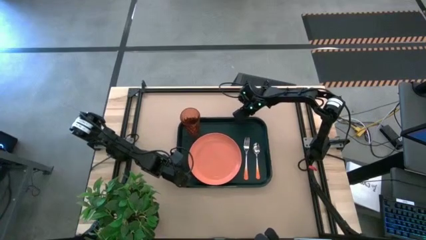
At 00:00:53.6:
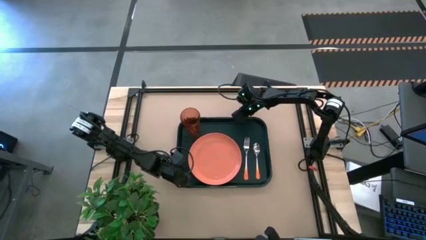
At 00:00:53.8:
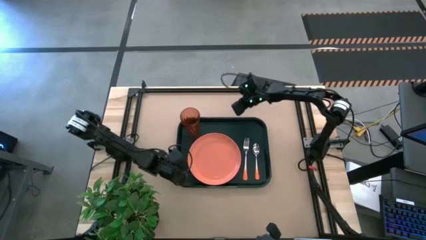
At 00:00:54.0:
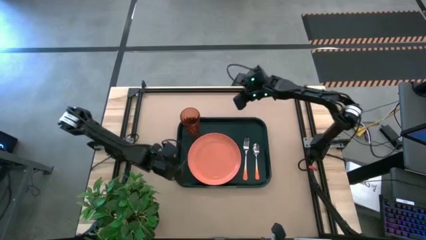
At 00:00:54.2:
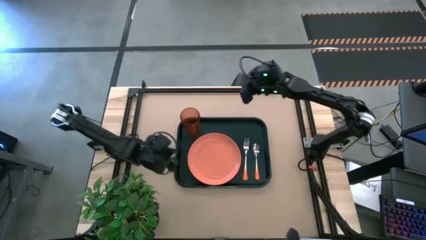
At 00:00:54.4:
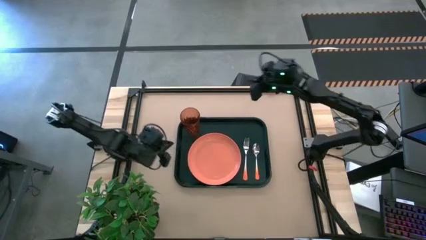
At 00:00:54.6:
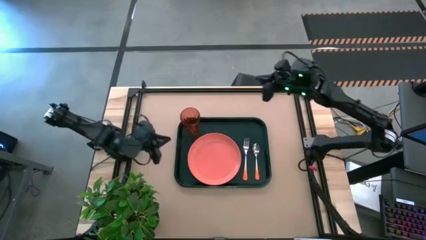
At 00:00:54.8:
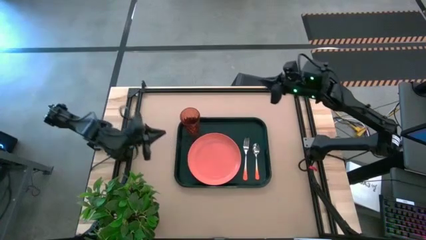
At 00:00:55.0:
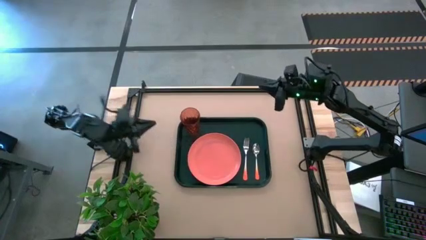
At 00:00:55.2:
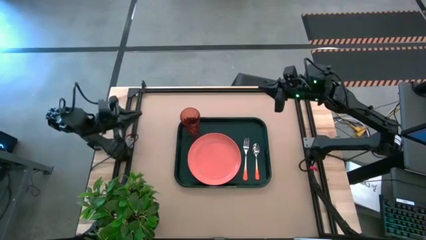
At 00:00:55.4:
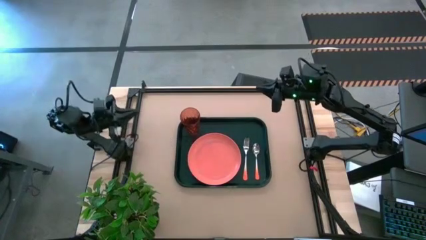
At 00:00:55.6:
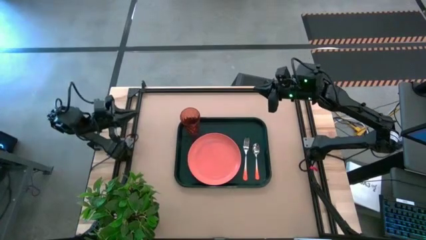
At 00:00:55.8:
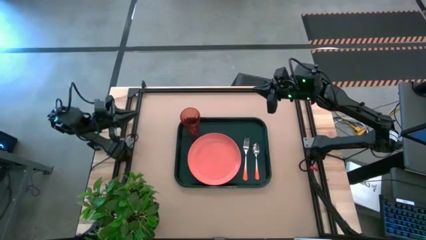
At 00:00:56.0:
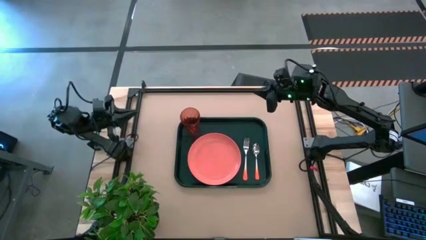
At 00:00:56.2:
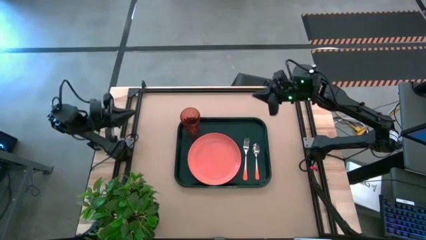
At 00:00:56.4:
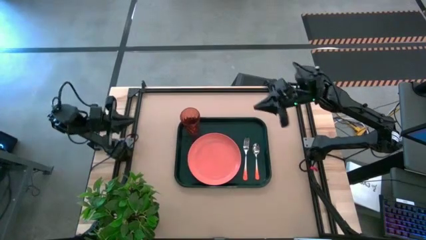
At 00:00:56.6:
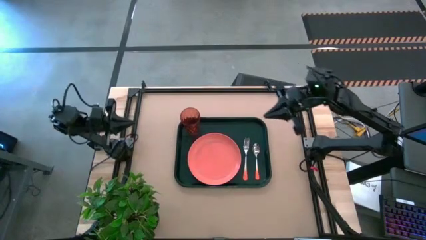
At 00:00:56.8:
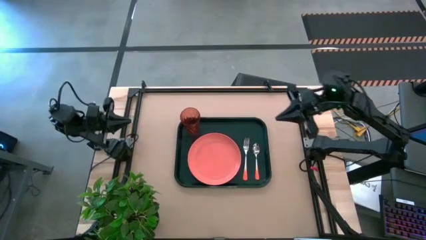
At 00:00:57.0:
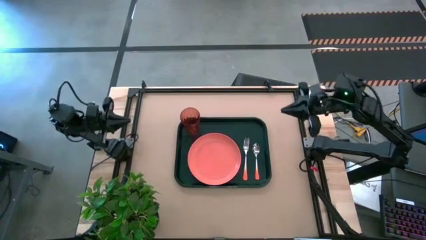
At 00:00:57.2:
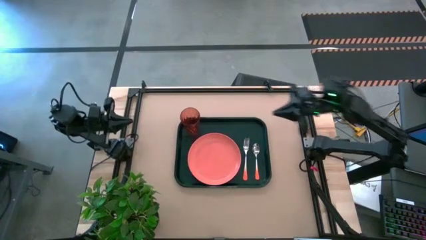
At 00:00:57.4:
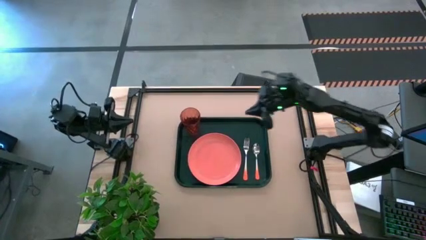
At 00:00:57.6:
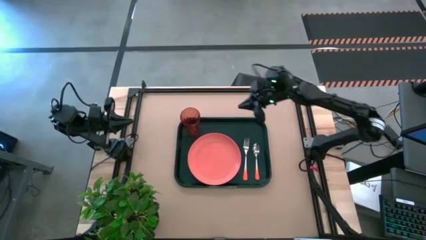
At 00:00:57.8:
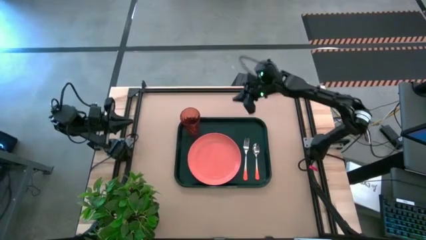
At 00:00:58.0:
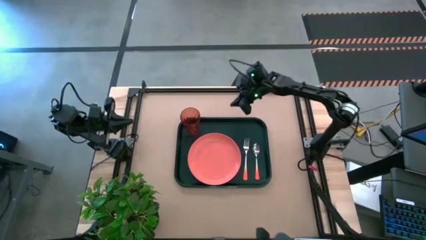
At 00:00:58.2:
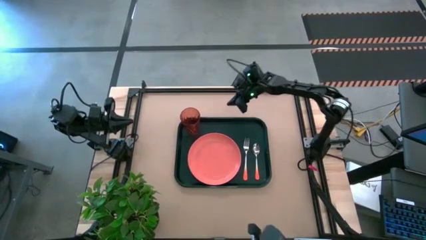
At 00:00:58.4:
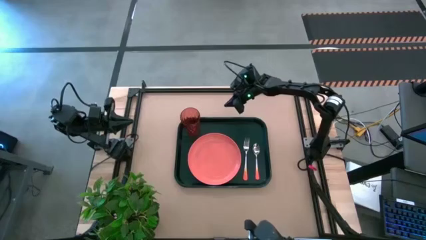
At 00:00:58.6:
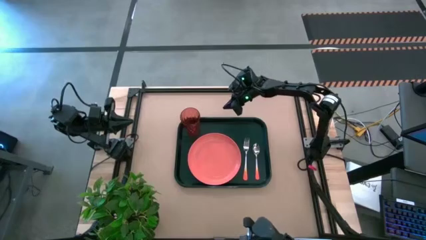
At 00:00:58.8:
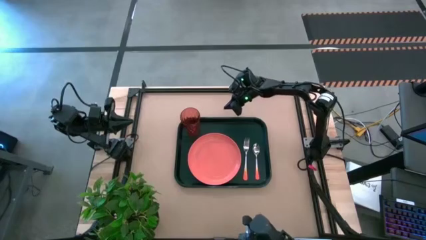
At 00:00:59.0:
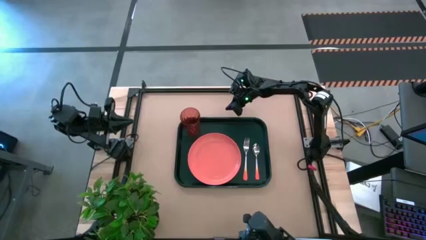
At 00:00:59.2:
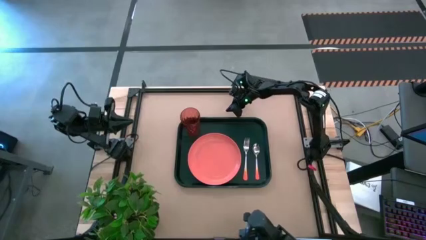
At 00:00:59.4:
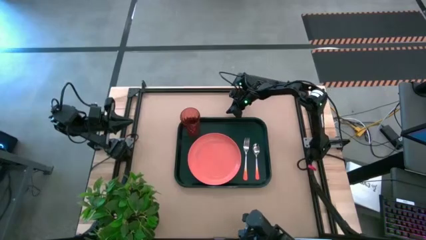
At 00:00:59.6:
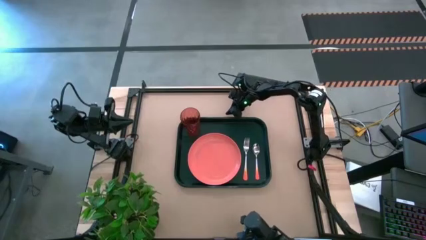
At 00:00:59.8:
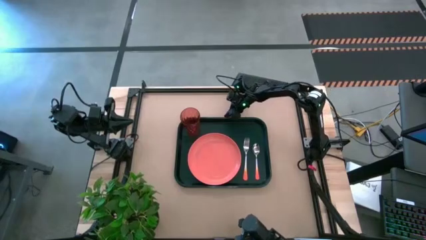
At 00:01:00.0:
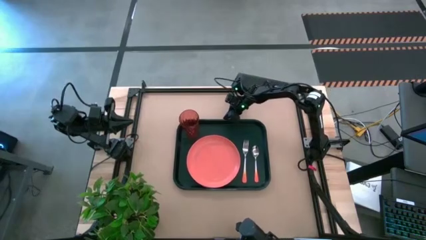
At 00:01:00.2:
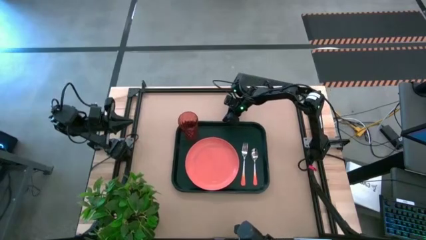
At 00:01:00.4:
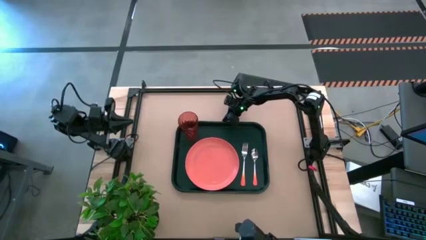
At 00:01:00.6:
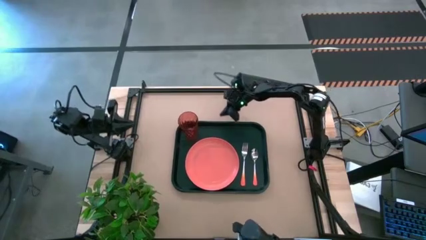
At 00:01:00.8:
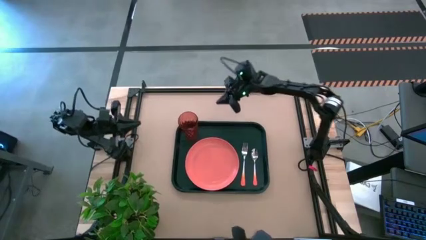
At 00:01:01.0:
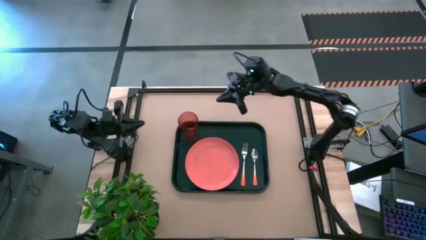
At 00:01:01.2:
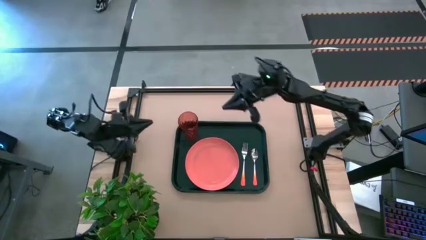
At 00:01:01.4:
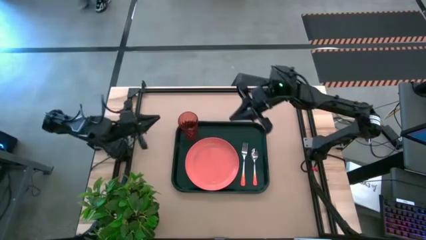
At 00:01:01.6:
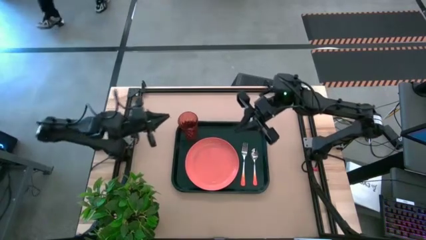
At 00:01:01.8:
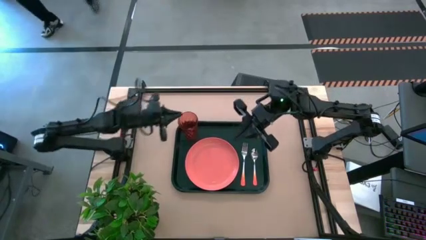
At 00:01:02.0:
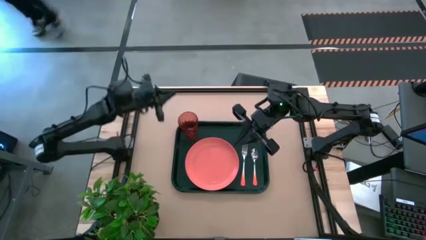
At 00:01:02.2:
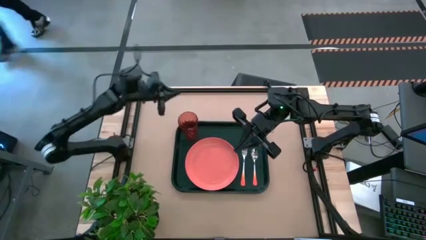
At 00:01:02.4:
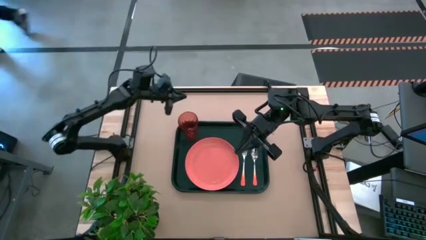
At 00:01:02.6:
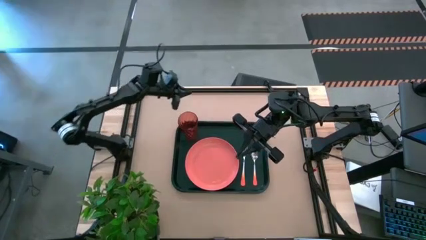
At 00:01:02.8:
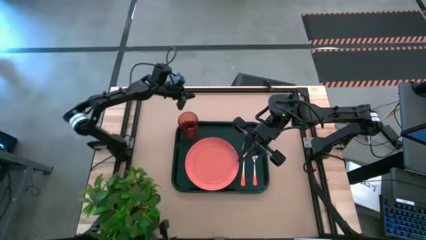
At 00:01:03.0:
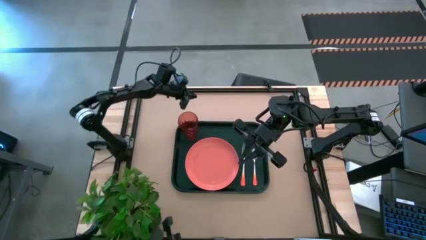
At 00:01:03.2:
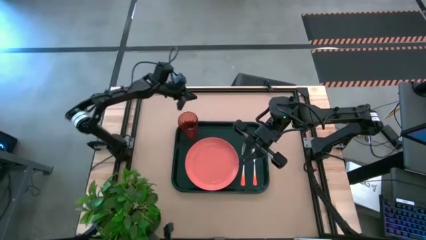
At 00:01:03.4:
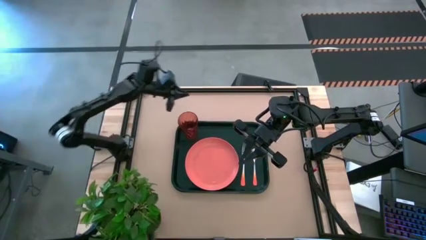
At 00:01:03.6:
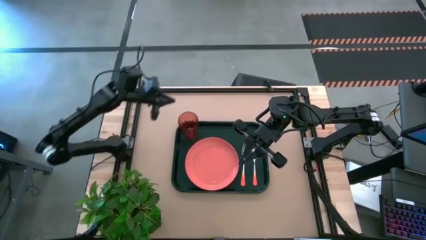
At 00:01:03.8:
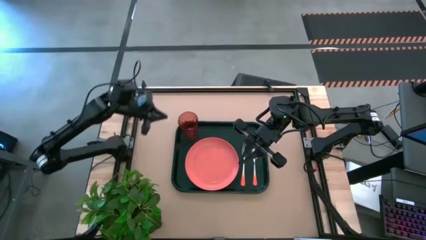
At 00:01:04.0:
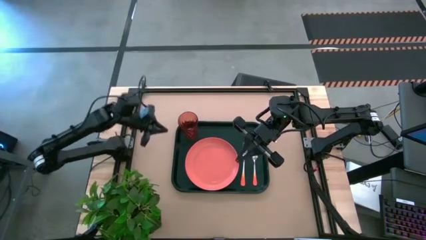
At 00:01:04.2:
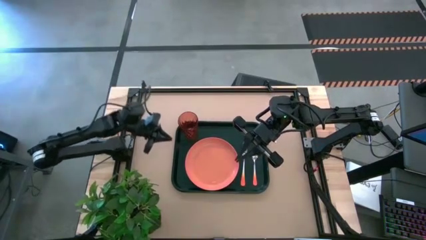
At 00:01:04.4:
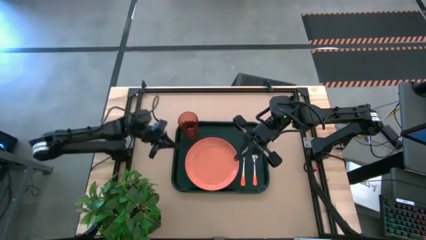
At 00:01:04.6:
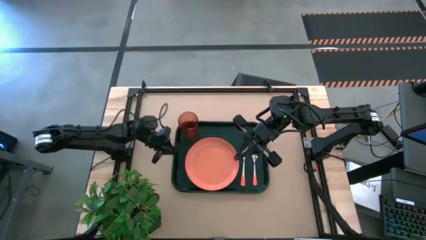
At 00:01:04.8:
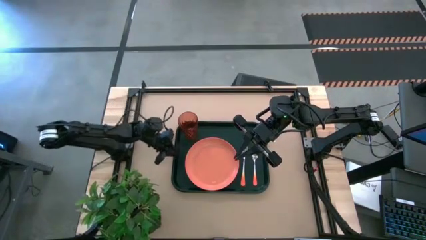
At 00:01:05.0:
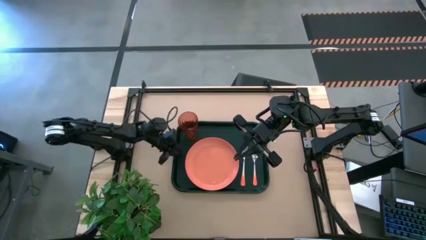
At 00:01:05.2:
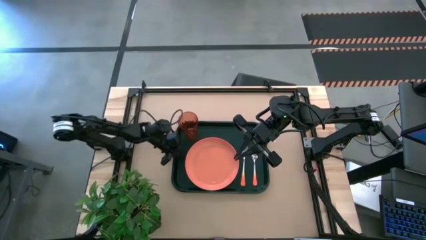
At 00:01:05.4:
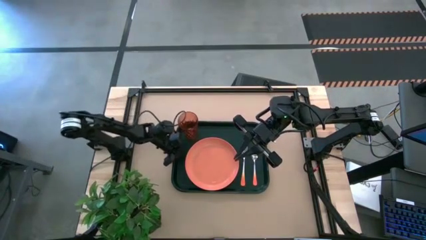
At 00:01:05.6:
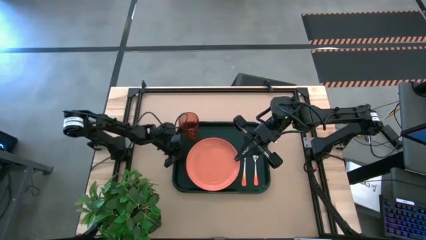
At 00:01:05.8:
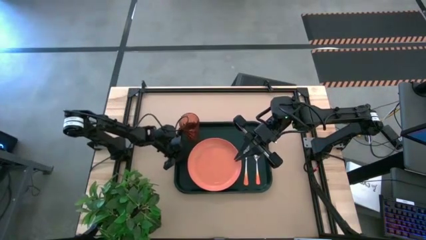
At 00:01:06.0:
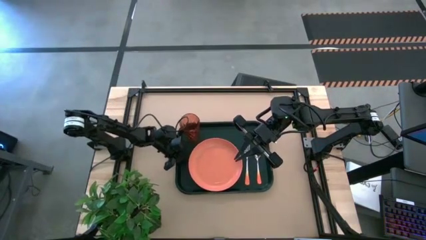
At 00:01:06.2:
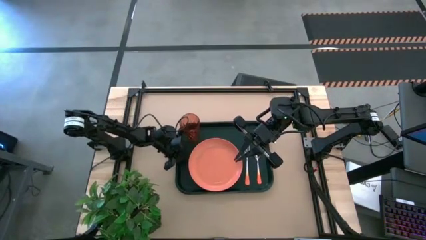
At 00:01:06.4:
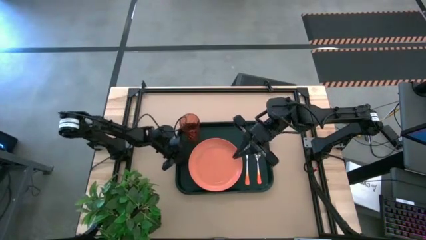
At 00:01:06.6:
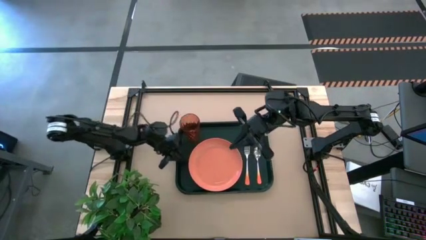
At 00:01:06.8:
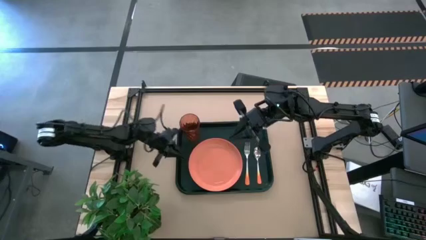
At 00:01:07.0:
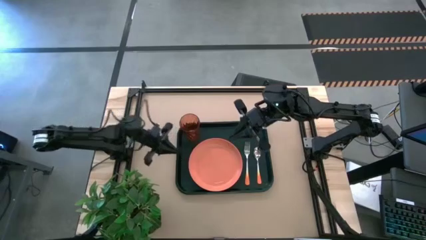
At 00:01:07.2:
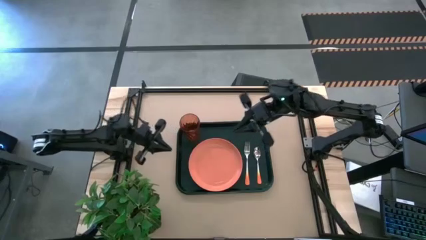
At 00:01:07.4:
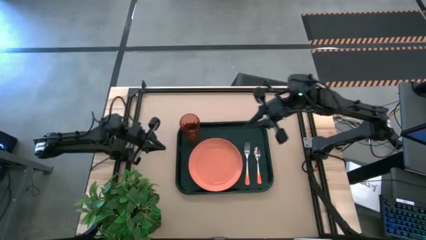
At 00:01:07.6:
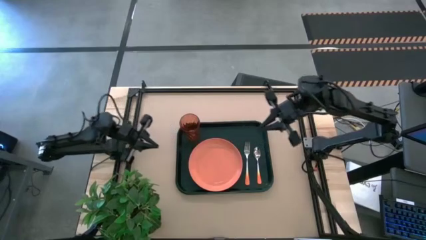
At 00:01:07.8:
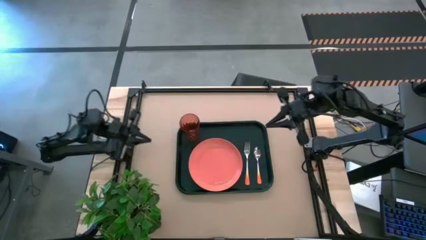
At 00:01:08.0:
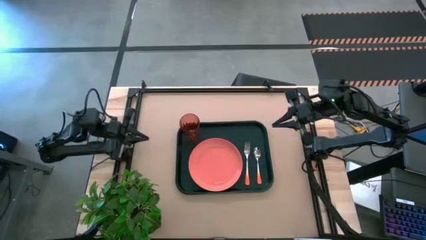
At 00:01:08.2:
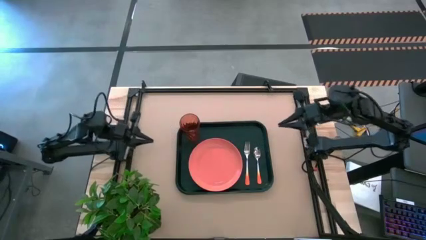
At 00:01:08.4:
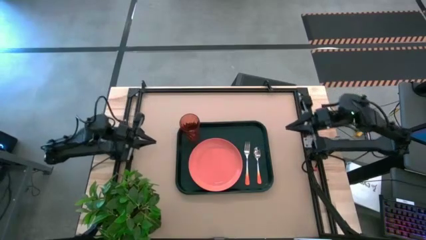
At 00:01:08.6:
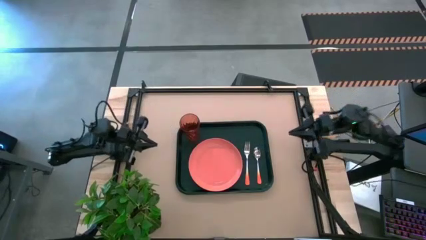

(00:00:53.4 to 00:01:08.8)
Task: Pick and place plate/cup/fork/spoon on tray
Adjust the black table tray
